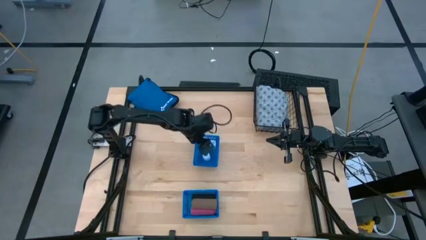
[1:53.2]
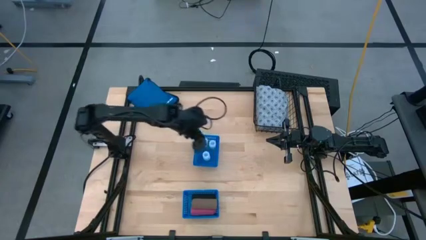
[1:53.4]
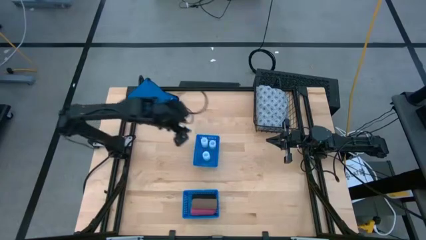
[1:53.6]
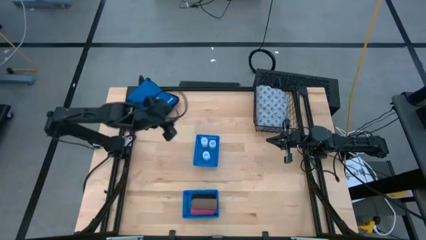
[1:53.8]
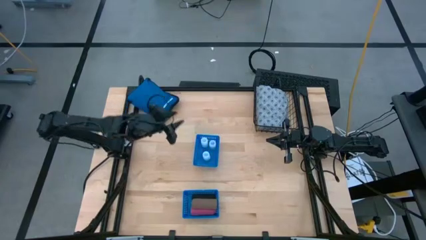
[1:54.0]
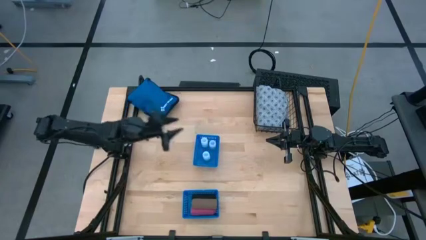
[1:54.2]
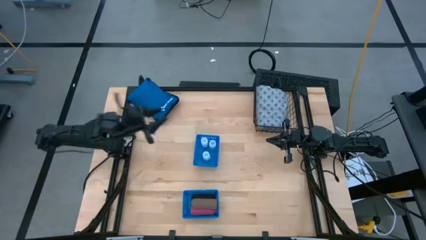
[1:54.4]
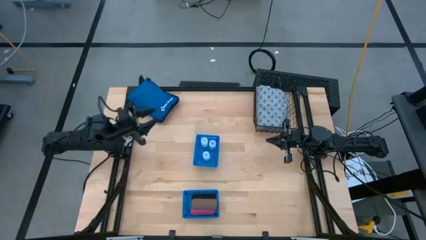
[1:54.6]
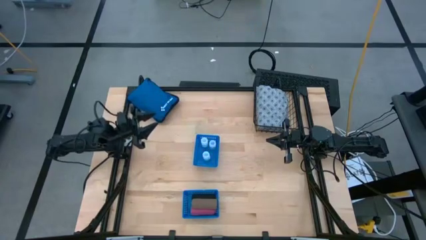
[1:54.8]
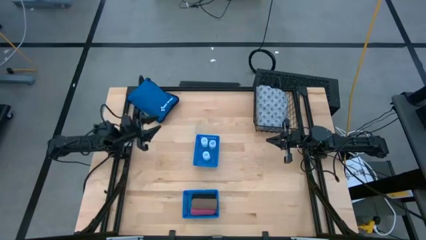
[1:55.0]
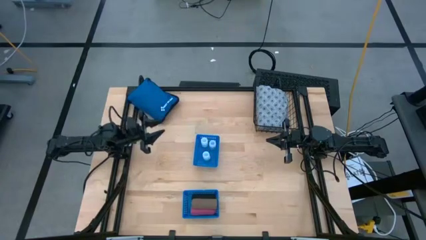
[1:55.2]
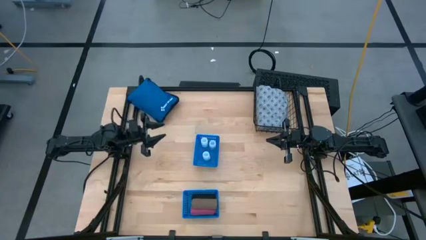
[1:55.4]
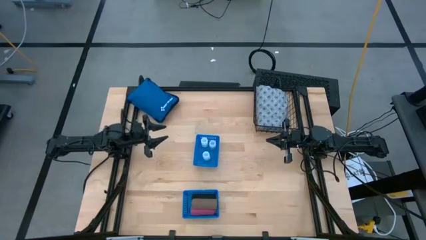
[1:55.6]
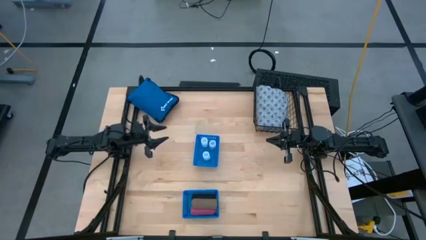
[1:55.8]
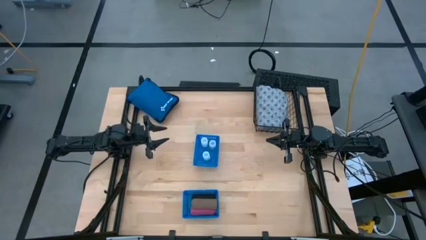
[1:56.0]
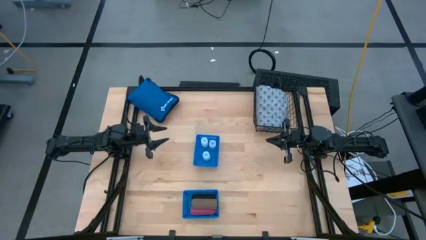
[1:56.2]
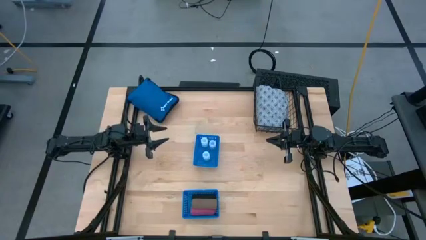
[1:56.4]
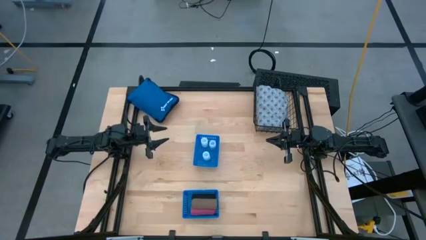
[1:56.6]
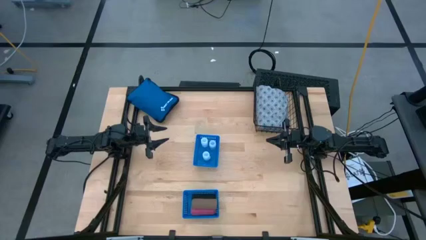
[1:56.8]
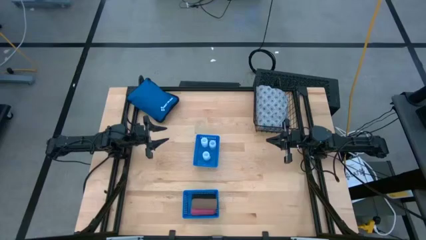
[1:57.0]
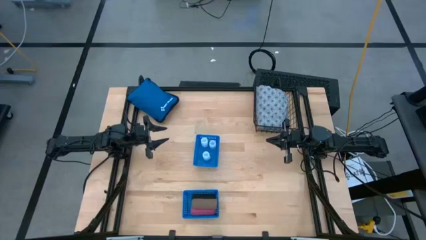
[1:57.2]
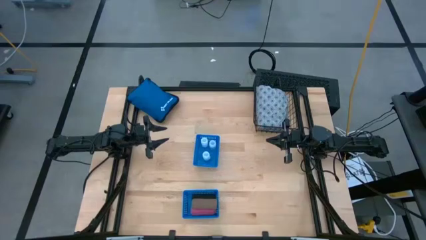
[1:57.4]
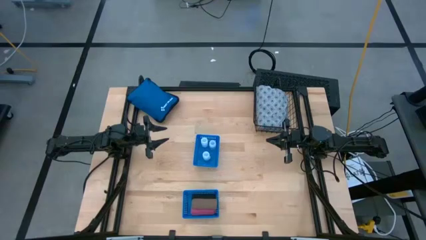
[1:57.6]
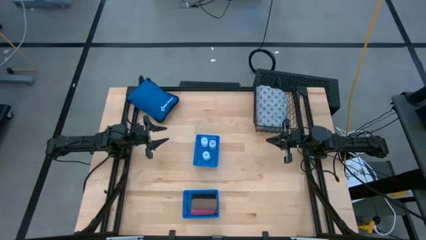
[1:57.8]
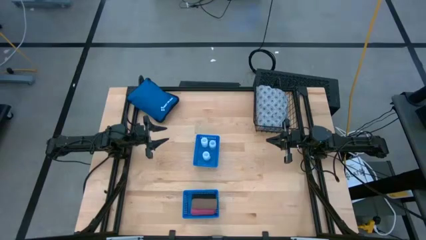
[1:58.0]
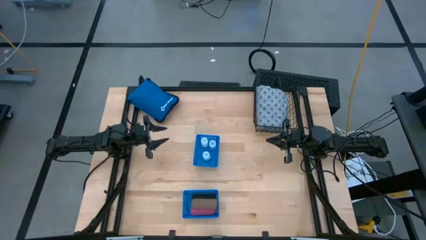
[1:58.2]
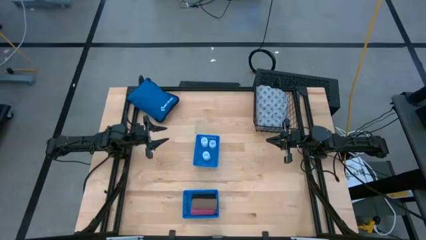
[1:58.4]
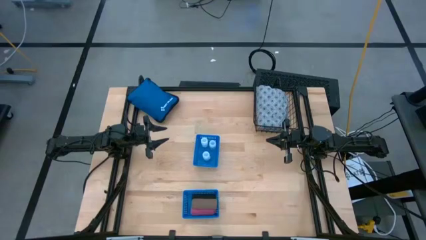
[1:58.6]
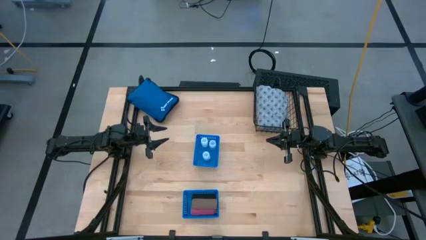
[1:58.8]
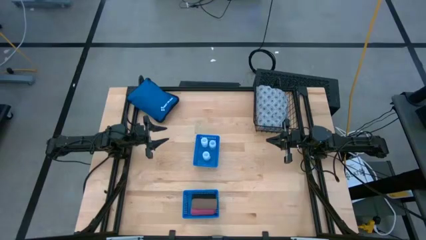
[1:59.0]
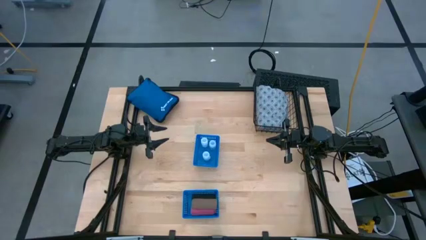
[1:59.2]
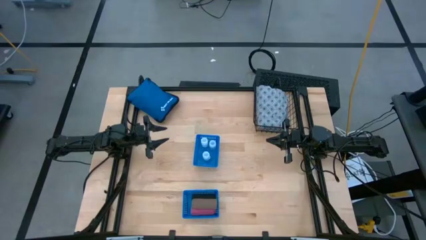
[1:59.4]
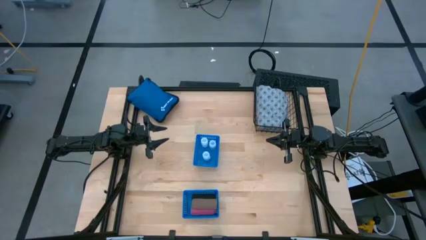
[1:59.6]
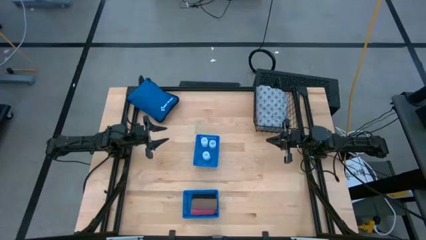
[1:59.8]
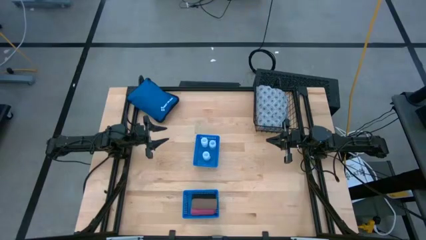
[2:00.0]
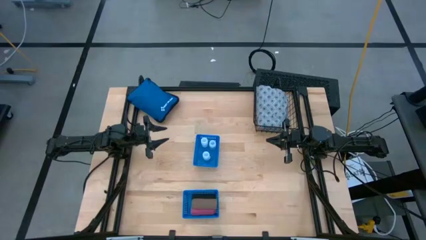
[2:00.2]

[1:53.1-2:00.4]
Task: Pick & place medical supplies in basket/bin
Return to Home Position

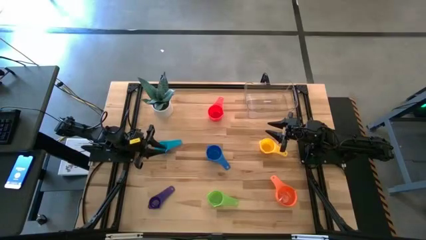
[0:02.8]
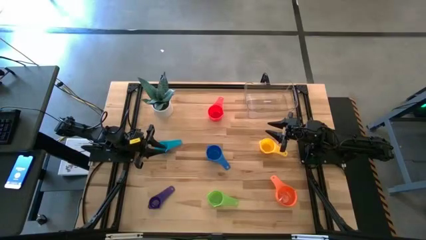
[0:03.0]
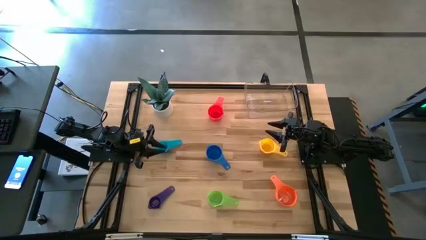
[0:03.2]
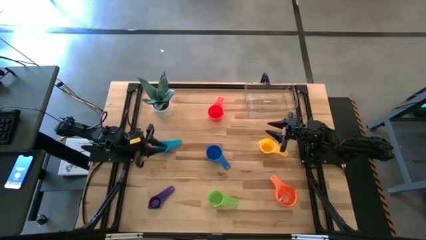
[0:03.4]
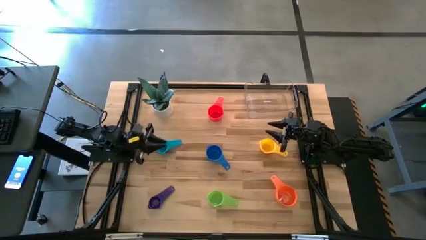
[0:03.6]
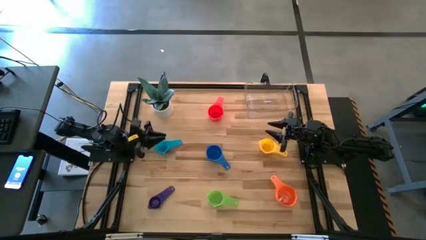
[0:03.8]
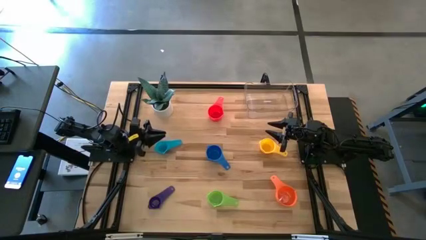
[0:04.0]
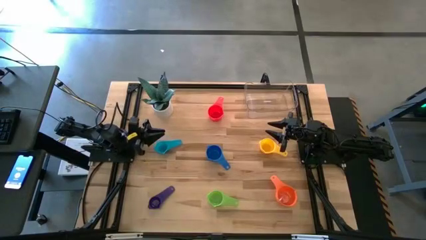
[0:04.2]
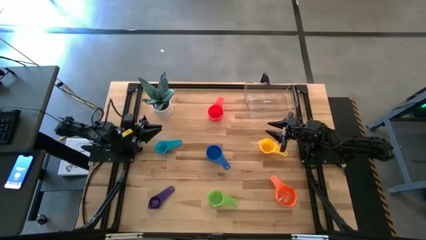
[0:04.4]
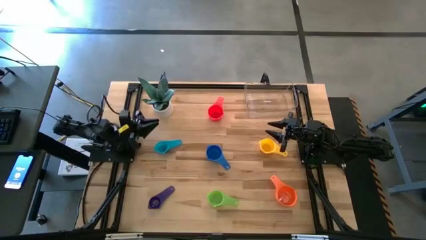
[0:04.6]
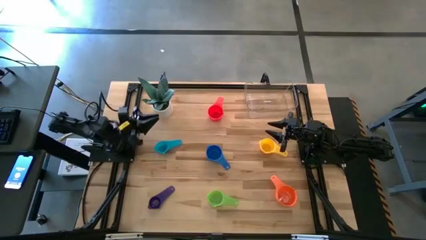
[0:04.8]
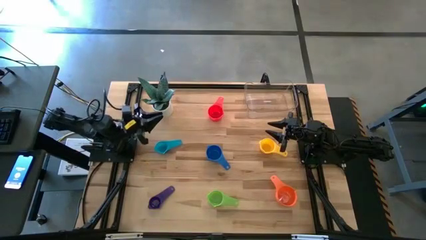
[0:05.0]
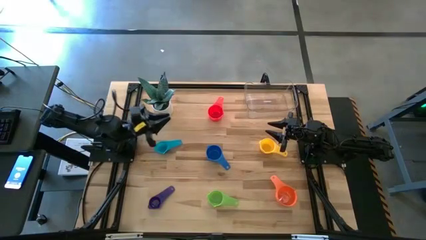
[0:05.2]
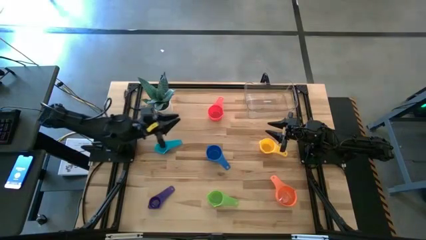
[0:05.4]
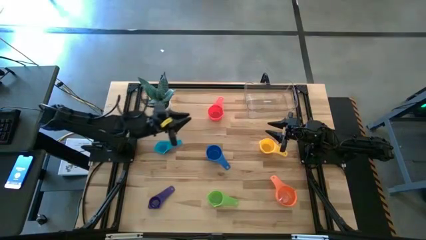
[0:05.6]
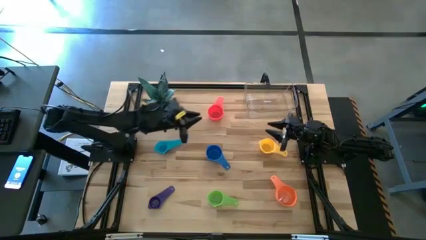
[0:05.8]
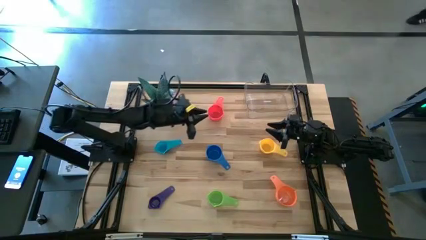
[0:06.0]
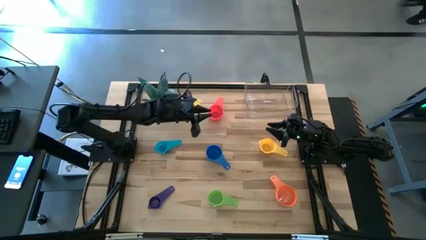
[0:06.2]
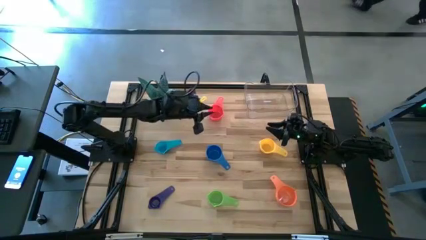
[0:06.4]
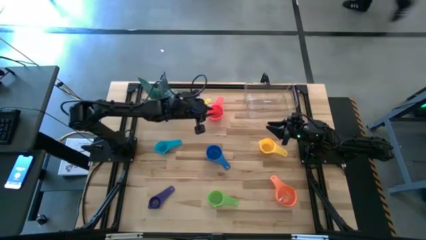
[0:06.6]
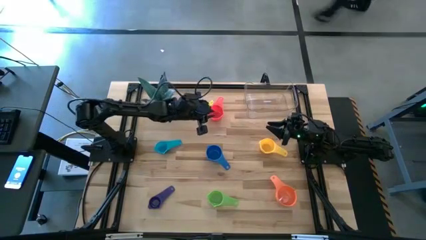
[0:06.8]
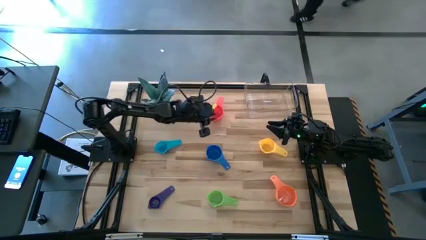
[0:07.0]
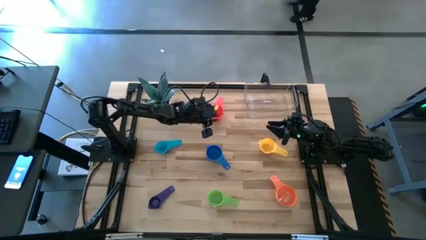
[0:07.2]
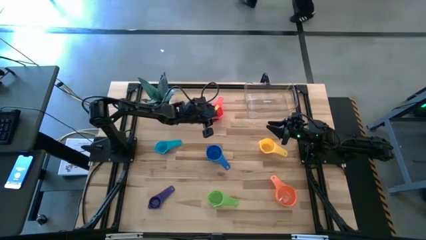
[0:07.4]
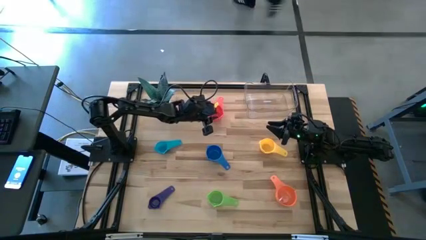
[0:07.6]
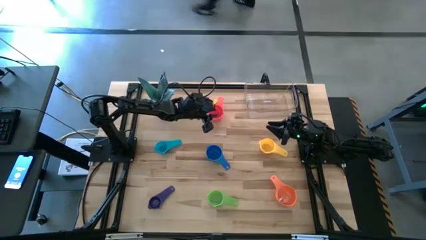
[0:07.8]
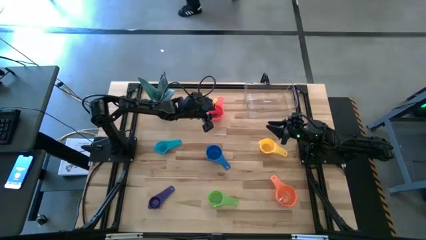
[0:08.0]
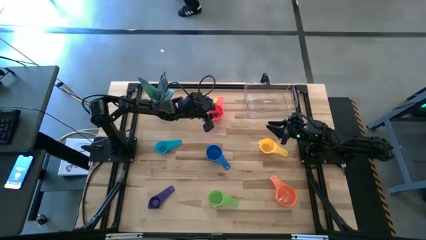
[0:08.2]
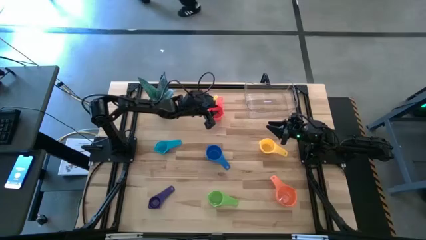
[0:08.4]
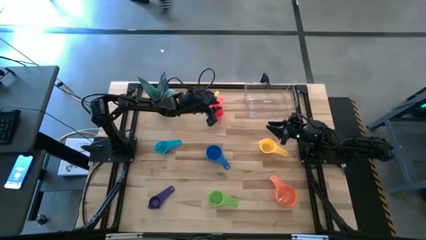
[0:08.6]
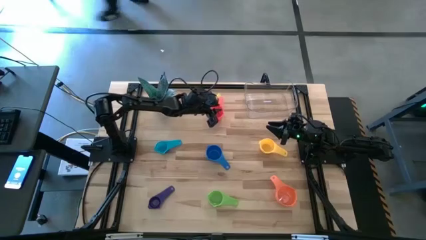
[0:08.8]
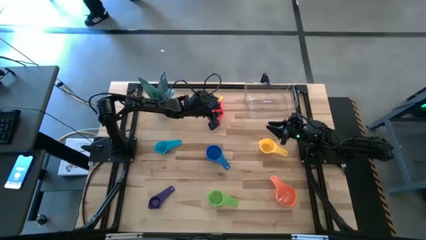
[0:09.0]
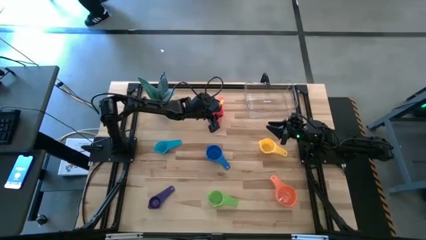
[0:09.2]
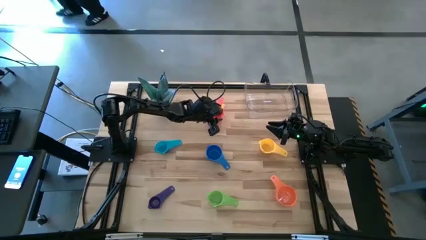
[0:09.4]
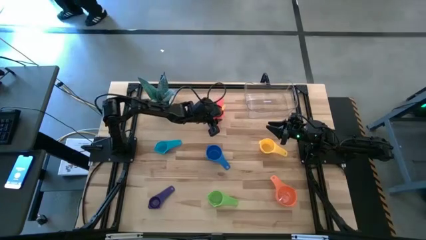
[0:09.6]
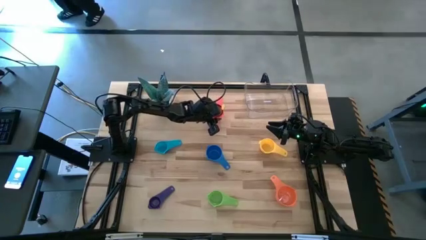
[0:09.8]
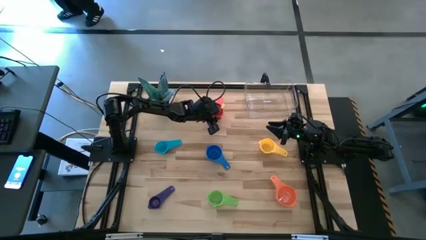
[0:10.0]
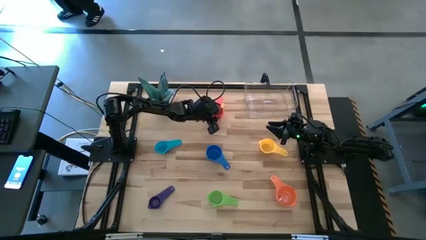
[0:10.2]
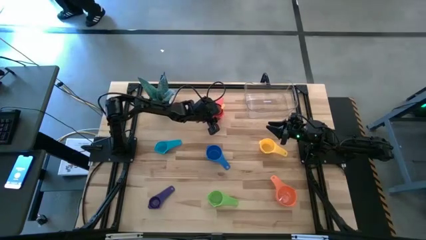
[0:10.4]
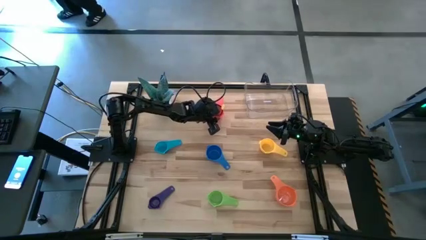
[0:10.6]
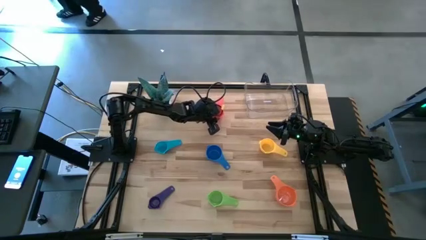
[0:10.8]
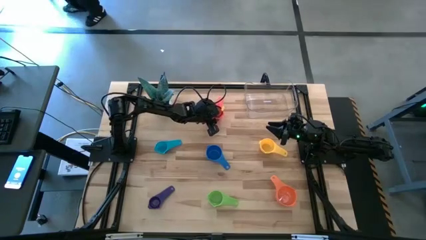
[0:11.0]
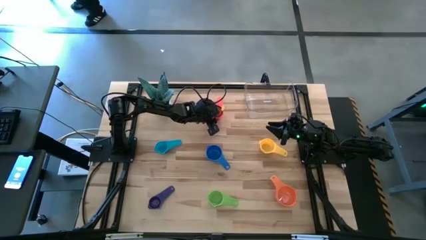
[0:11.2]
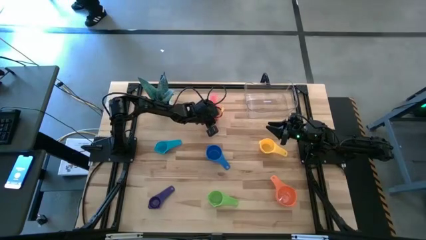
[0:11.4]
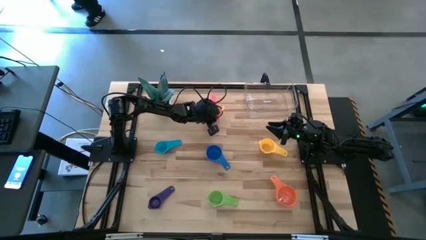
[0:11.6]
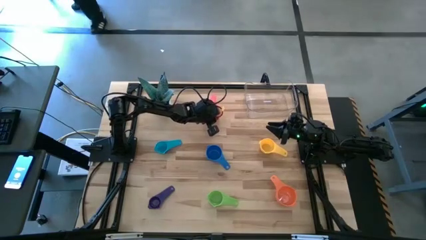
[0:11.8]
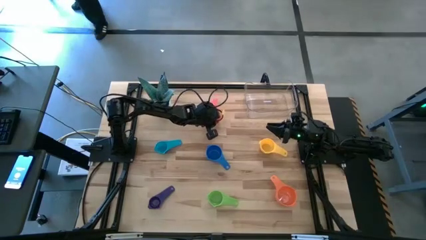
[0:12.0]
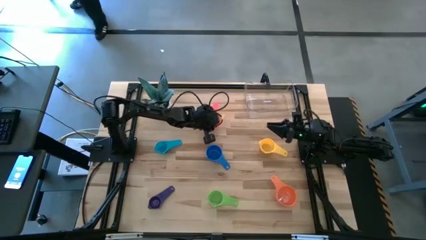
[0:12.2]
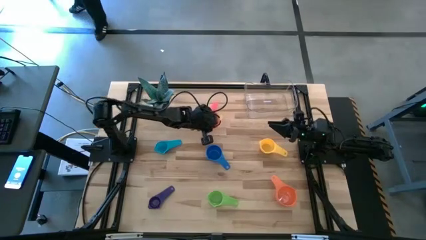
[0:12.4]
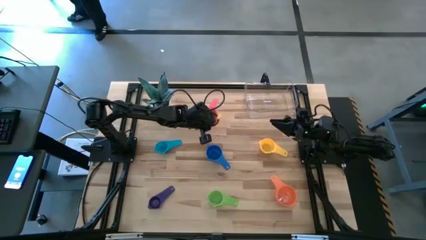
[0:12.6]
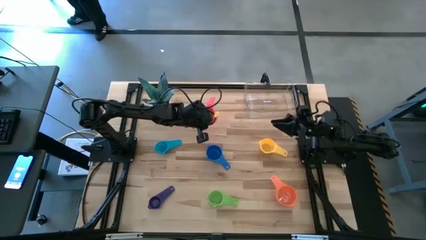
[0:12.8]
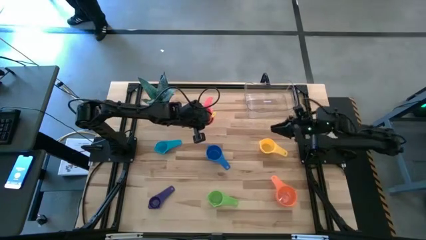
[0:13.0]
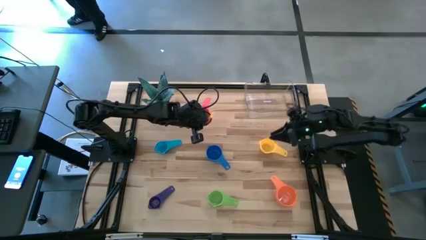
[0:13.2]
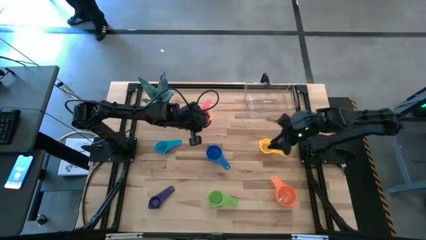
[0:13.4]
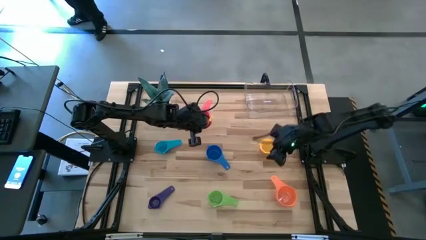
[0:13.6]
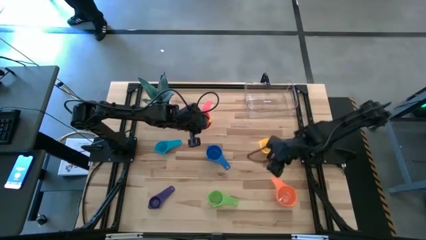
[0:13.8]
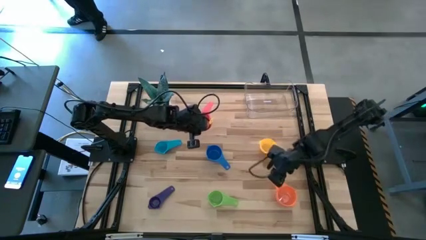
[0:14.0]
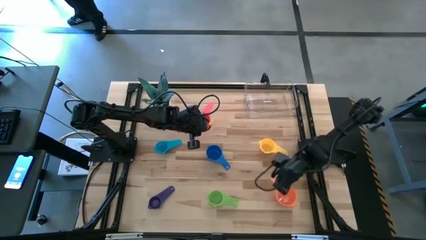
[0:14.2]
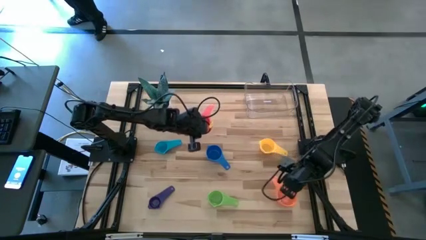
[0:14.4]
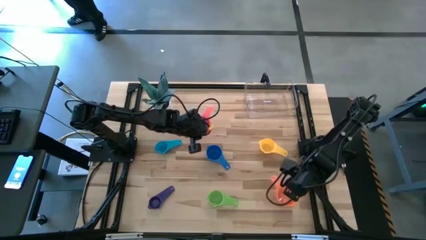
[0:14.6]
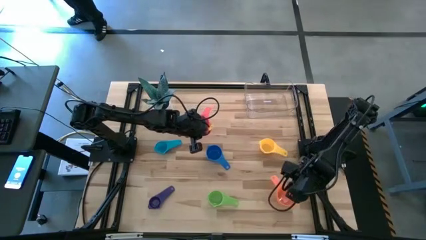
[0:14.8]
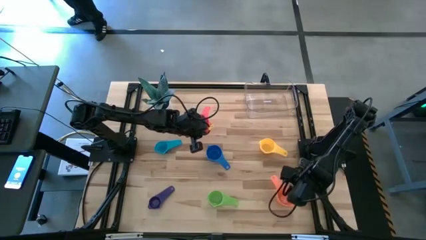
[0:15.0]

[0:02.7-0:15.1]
Task: Nest measuring cups in basket
Stack the red measuring cup on top of the orange measuring cup
